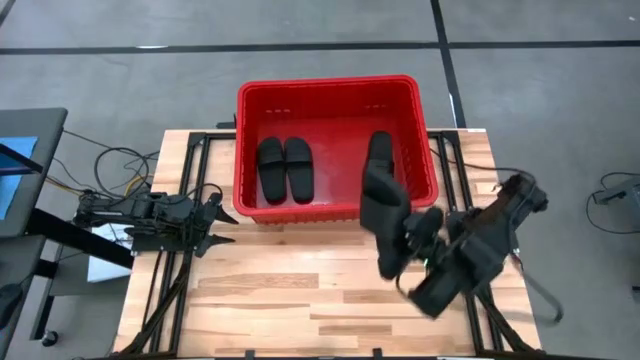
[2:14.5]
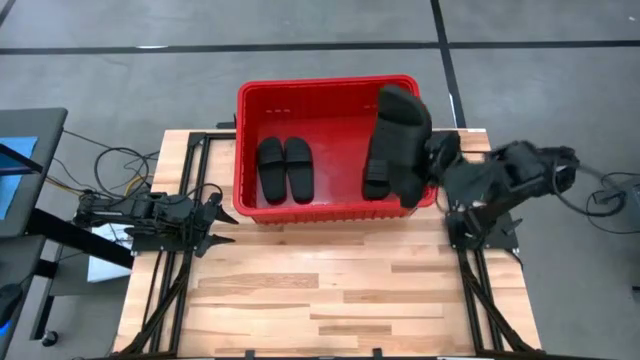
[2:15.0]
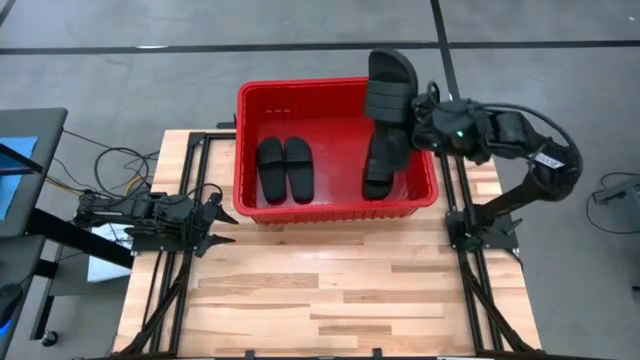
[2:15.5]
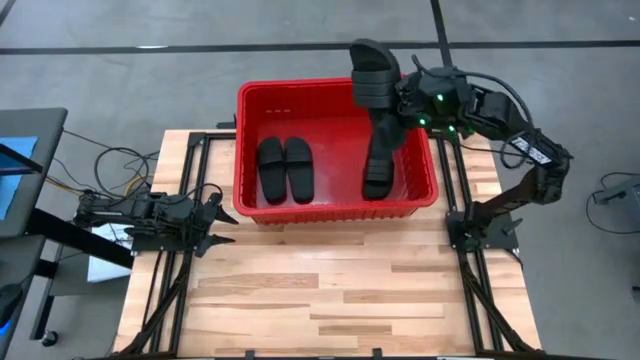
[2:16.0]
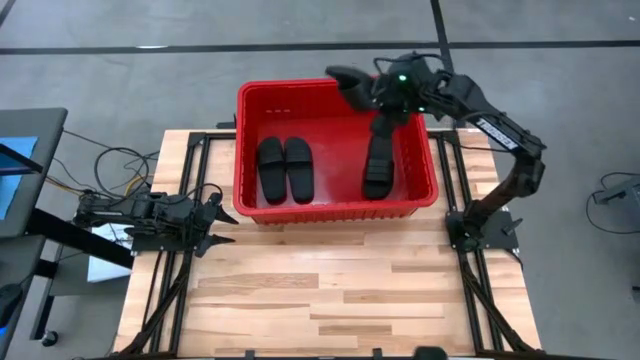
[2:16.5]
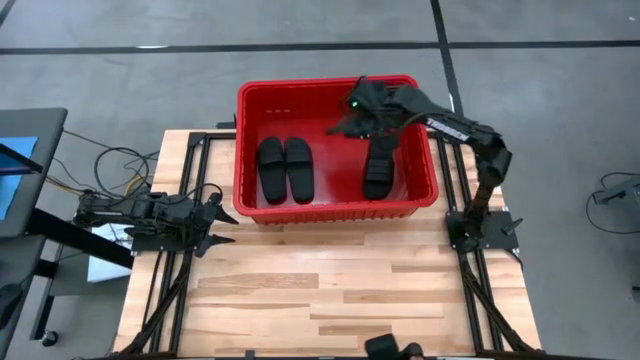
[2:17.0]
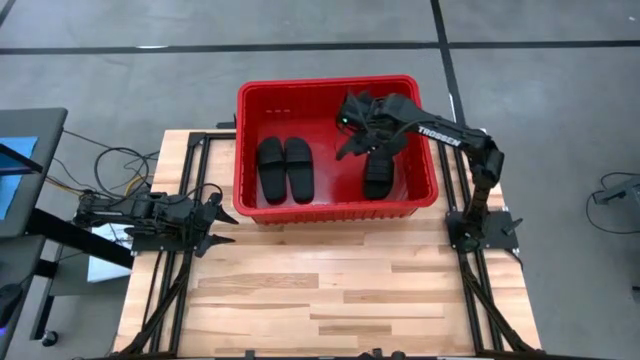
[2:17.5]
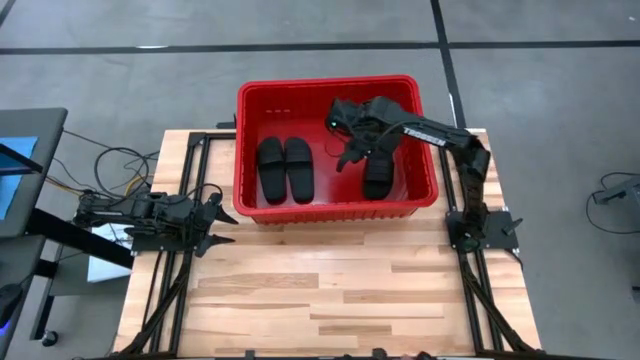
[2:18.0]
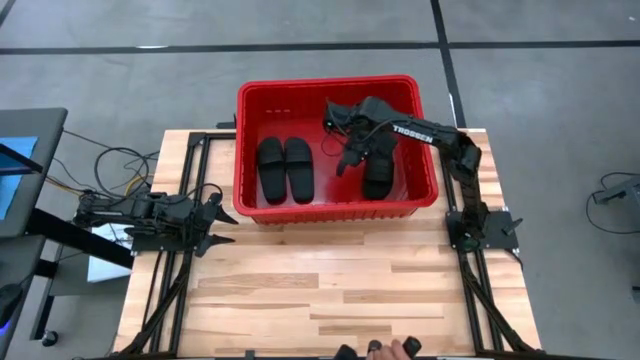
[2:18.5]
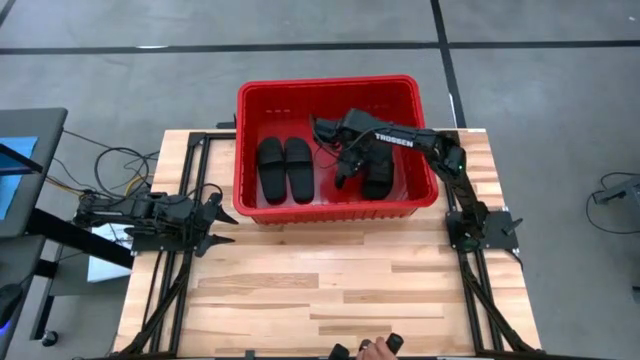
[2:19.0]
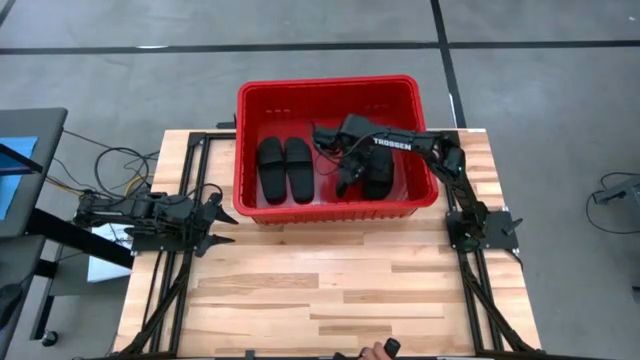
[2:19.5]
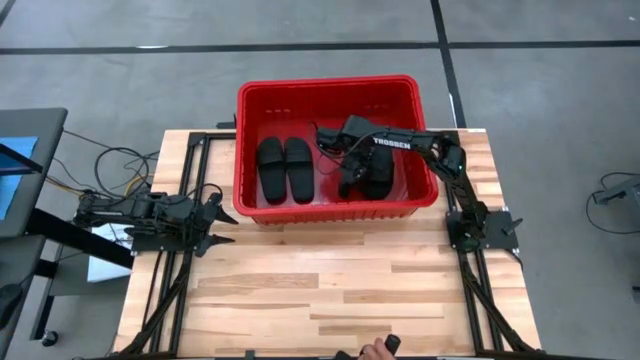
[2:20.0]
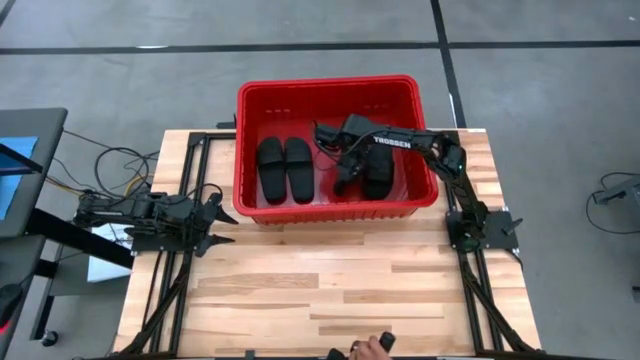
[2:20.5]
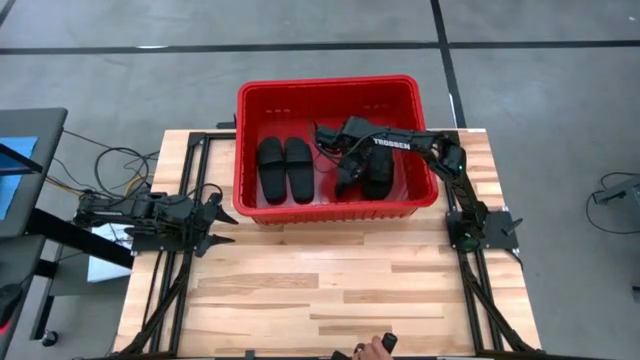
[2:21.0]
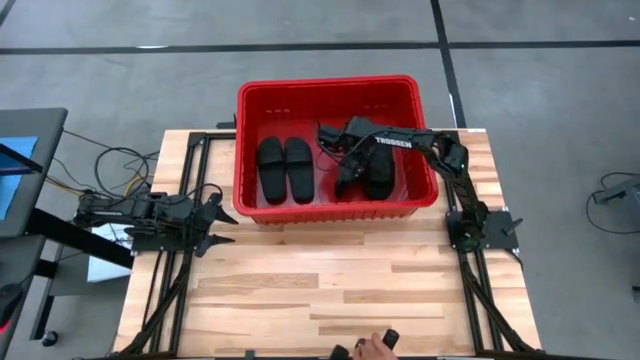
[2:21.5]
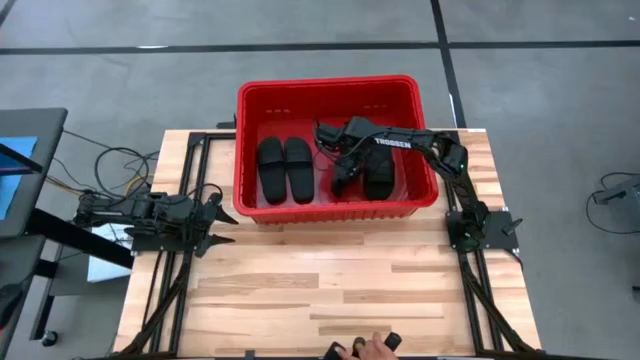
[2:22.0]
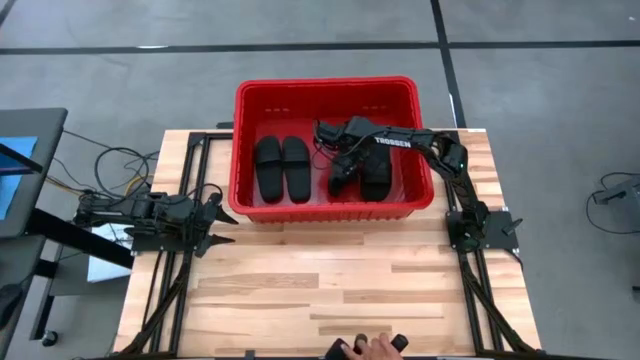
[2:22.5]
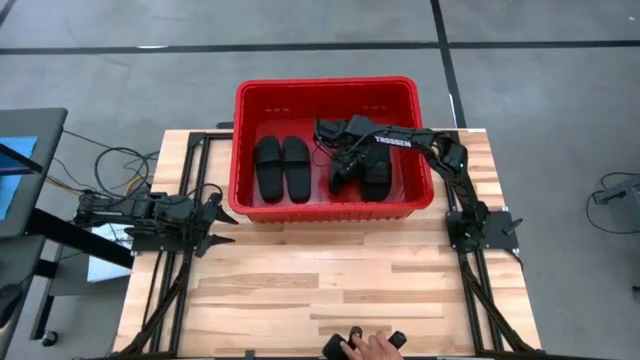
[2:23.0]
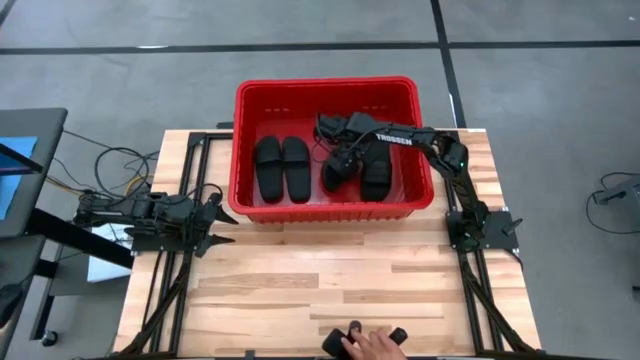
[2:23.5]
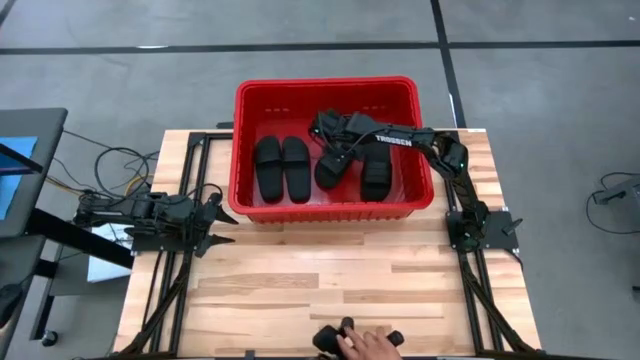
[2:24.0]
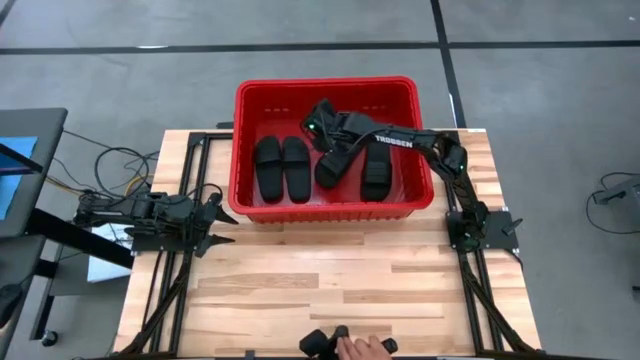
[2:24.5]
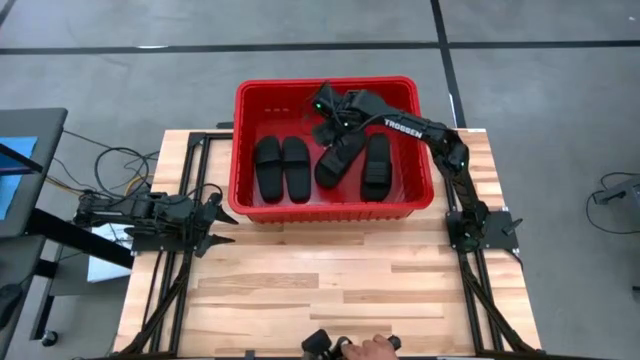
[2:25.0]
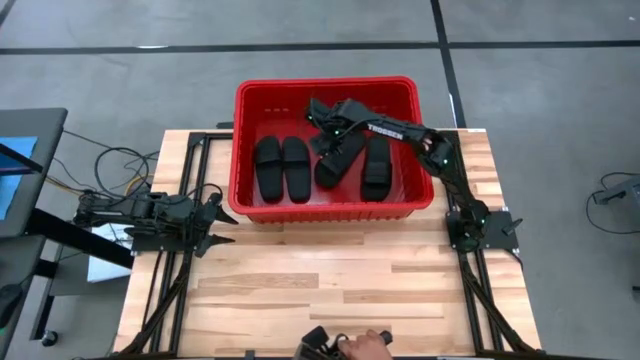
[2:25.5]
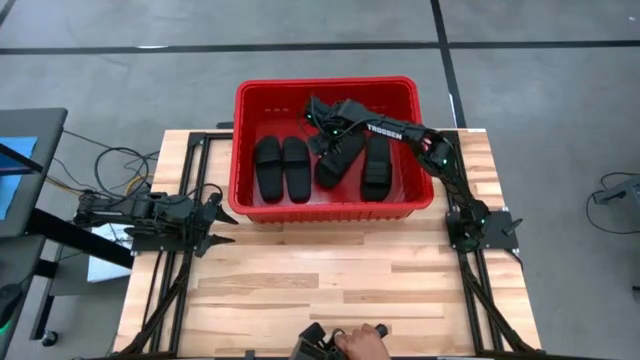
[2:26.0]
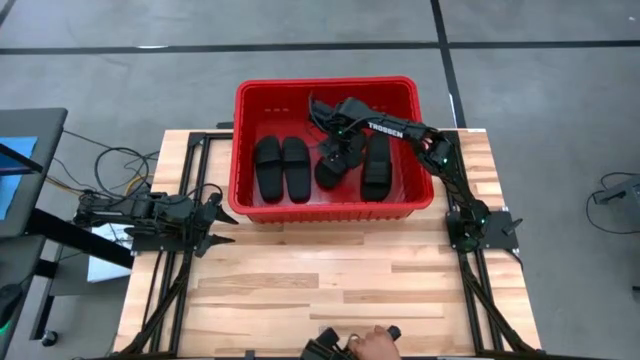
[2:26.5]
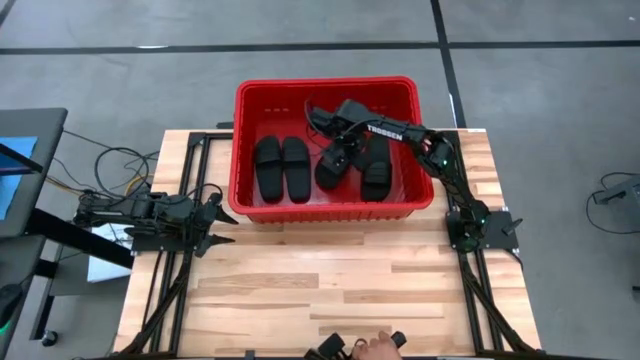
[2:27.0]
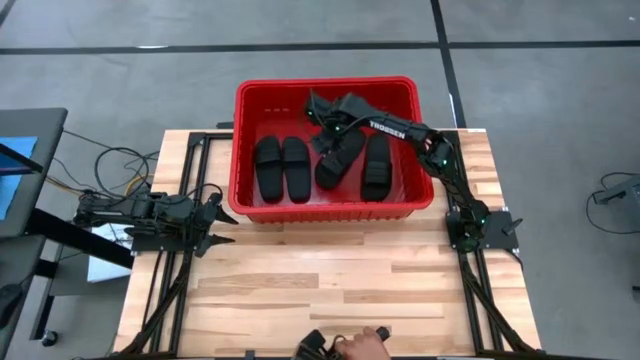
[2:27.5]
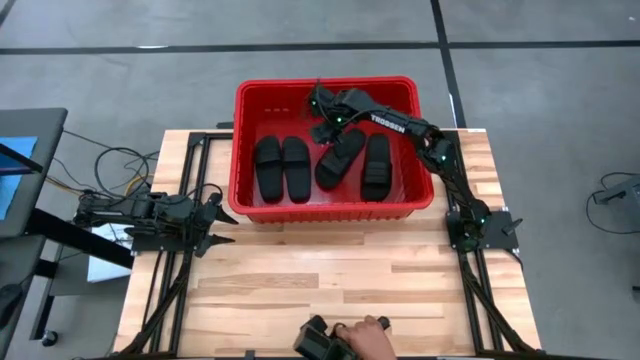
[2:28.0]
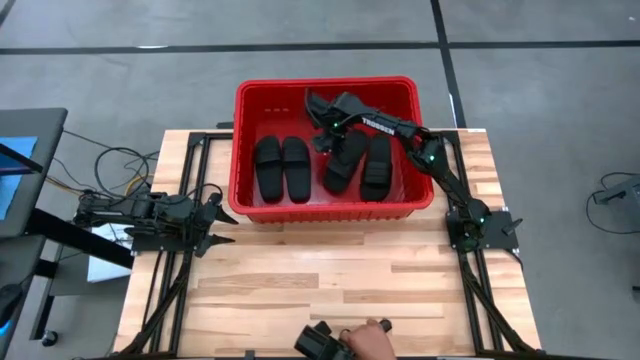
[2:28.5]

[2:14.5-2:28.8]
Task: Pick and place slides into bin
Put the black slides into the red bin

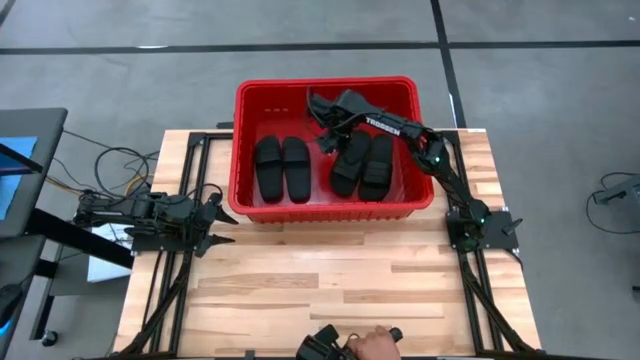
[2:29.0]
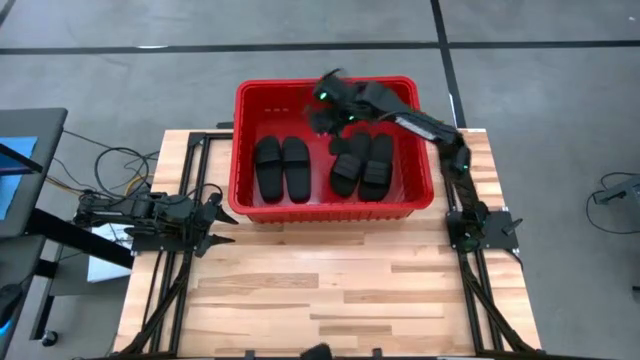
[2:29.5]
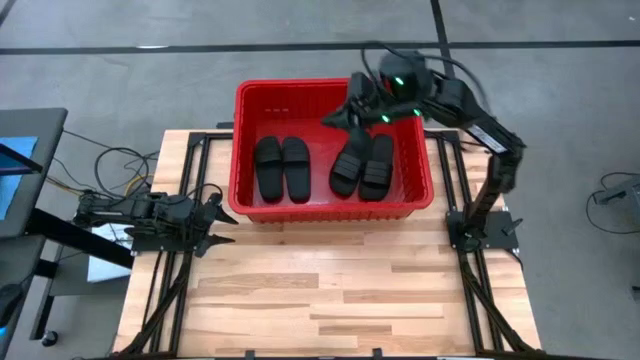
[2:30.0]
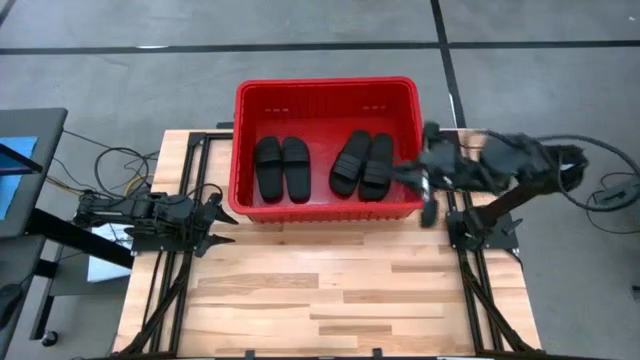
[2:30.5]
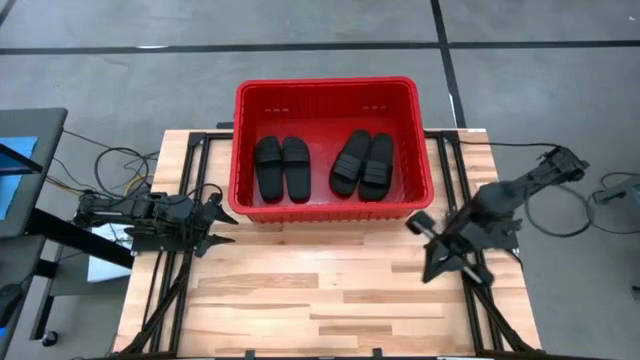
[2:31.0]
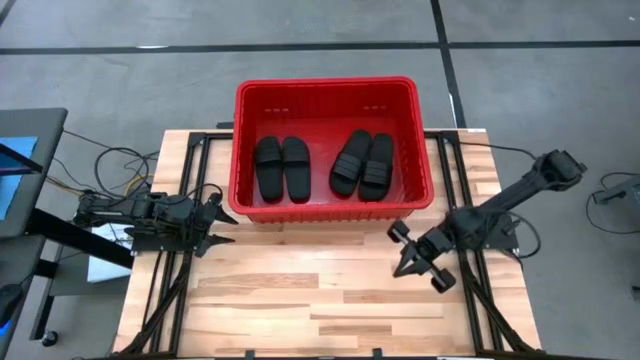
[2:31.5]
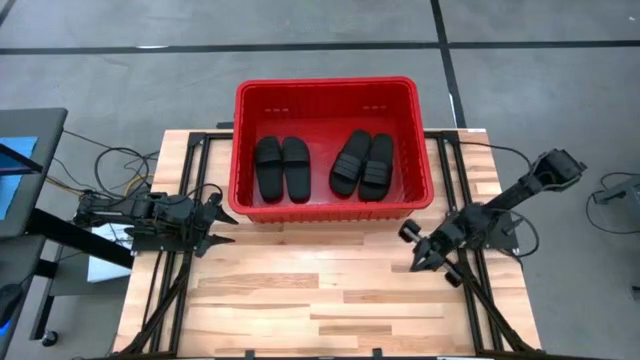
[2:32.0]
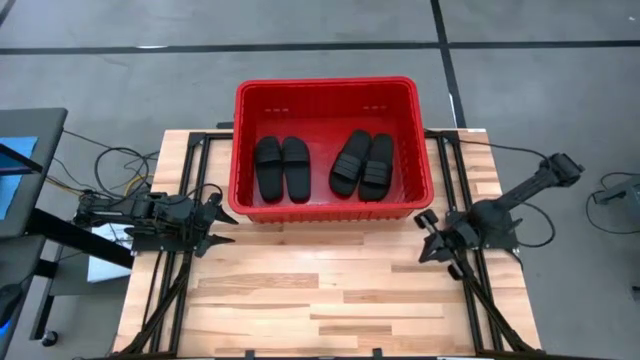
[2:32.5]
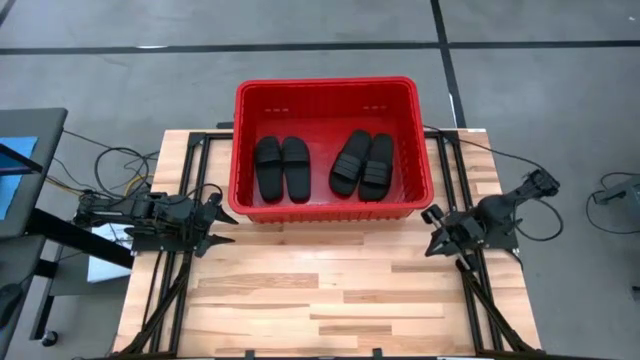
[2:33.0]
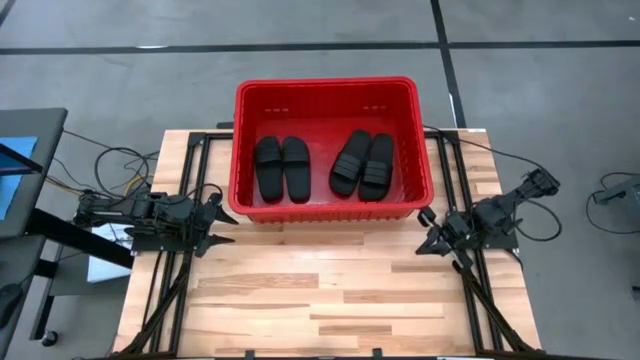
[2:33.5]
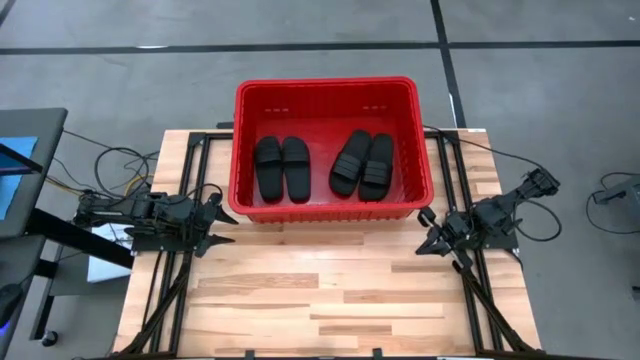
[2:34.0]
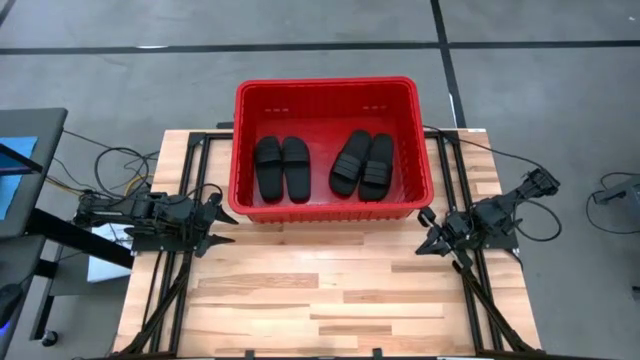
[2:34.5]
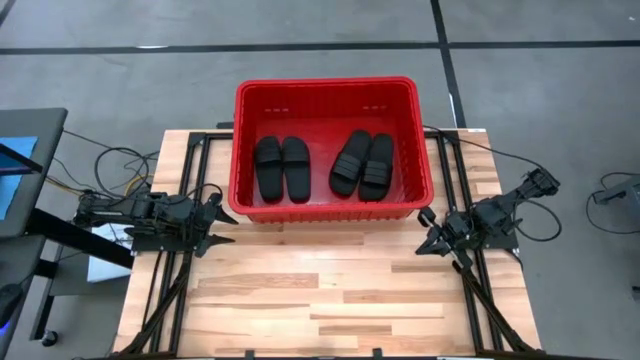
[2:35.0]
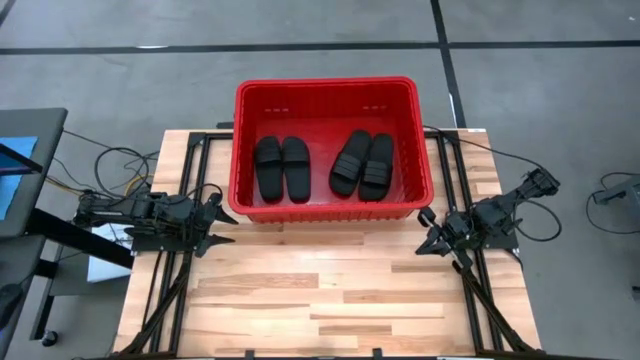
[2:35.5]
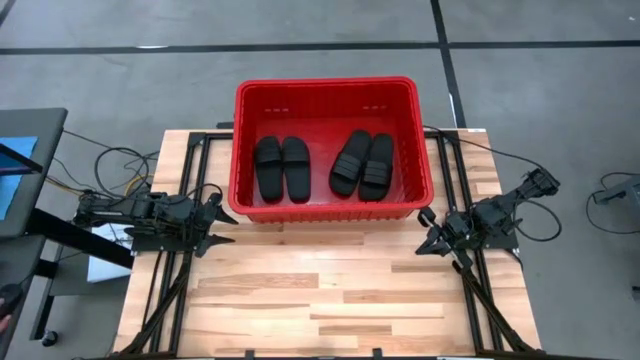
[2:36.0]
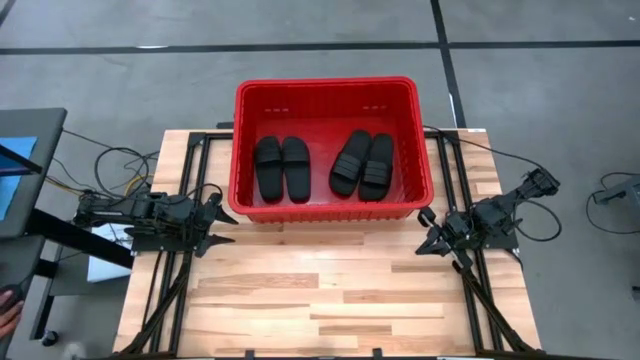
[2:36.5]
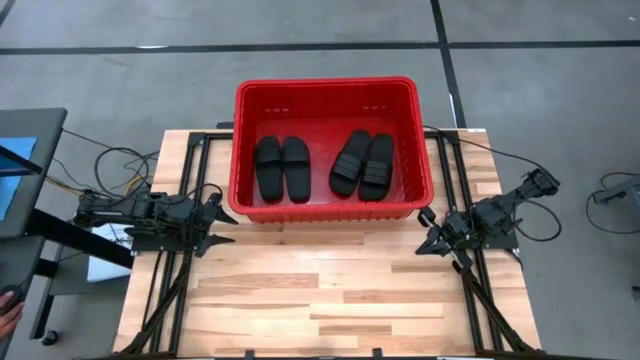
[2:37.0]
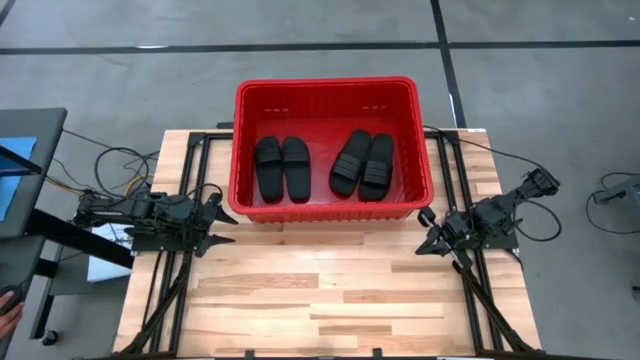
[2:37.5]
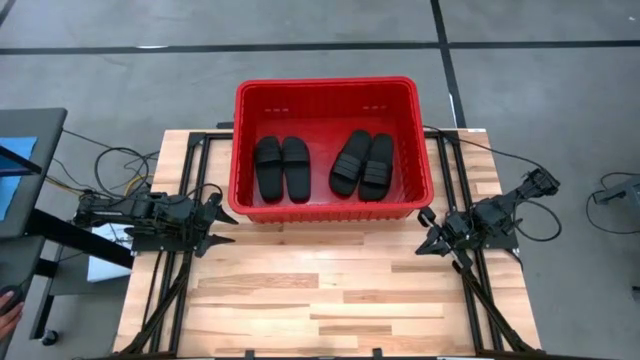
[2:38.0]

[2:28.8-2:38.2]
Return to Home Position
